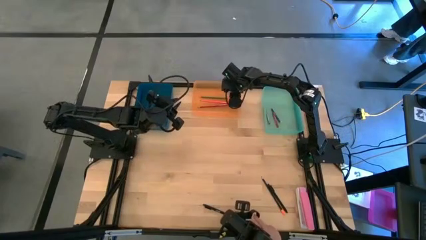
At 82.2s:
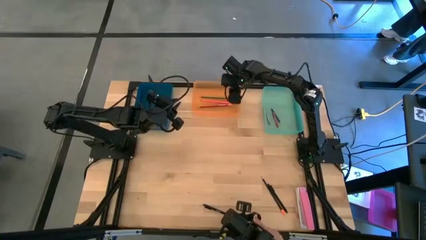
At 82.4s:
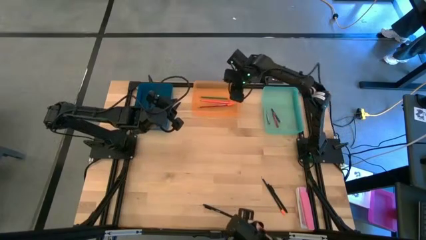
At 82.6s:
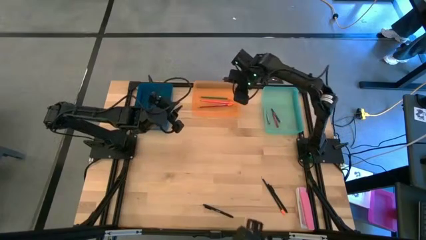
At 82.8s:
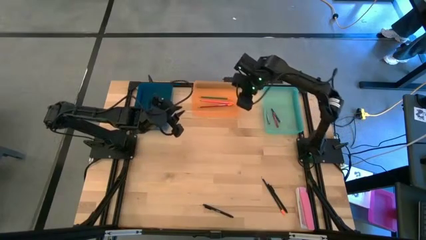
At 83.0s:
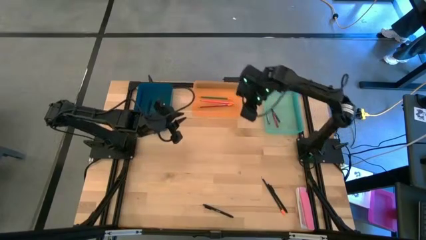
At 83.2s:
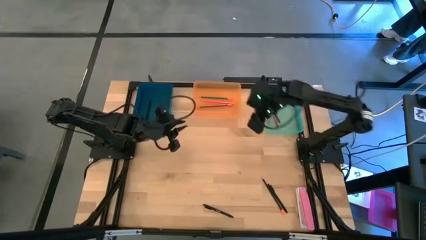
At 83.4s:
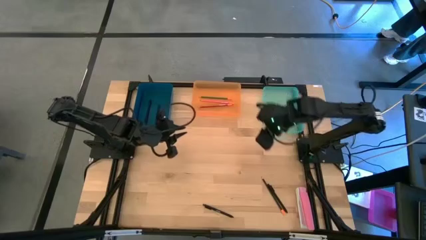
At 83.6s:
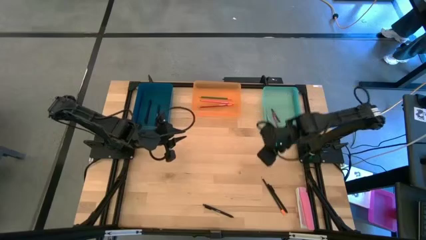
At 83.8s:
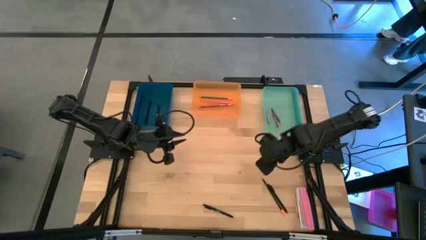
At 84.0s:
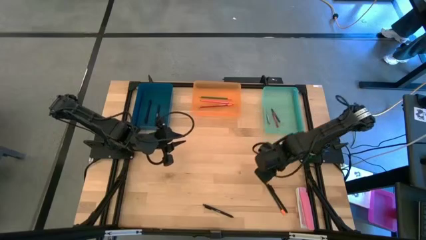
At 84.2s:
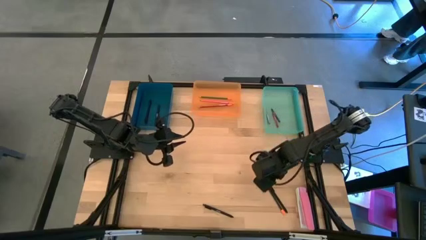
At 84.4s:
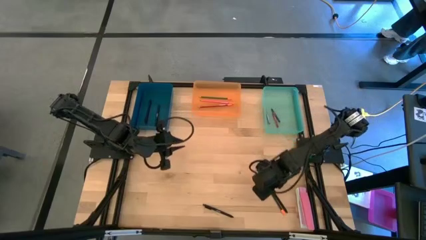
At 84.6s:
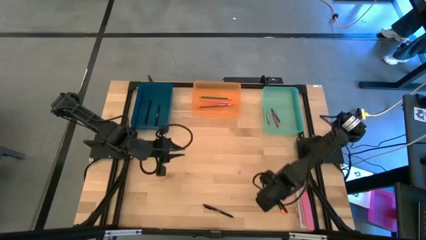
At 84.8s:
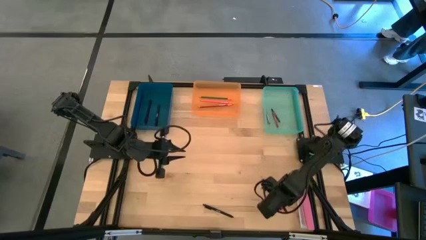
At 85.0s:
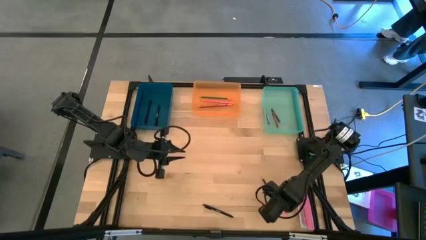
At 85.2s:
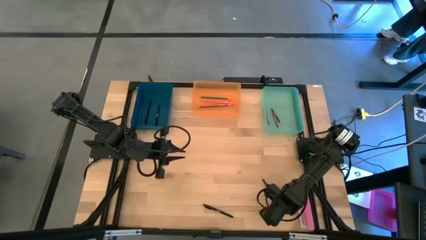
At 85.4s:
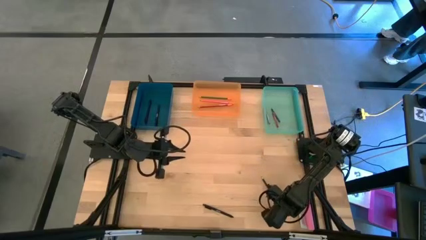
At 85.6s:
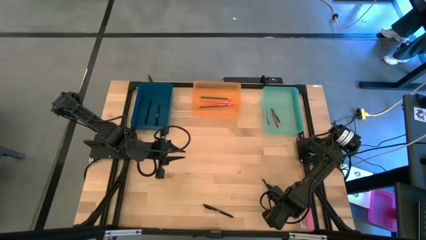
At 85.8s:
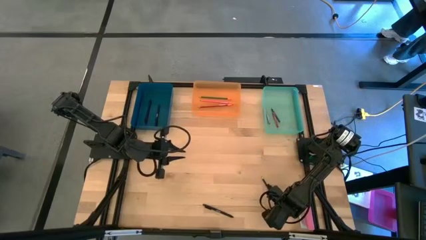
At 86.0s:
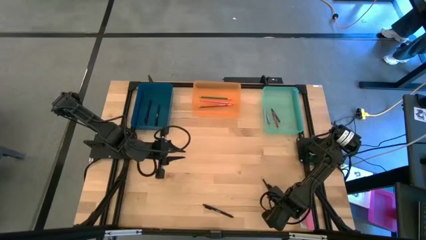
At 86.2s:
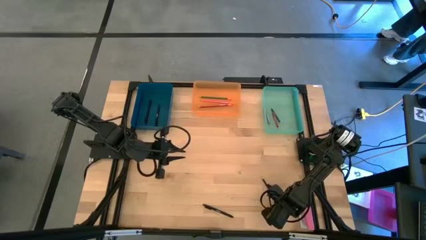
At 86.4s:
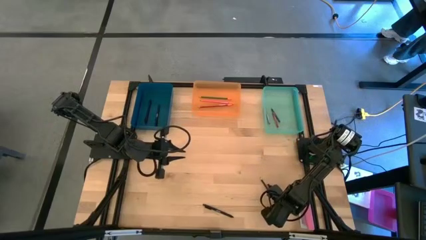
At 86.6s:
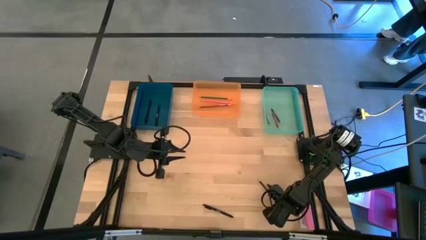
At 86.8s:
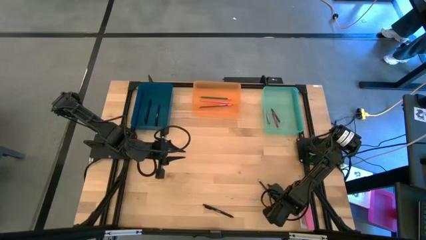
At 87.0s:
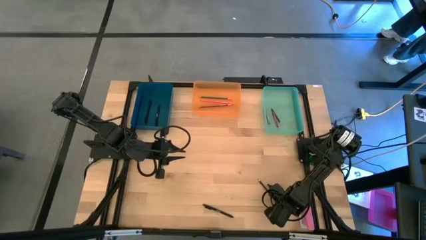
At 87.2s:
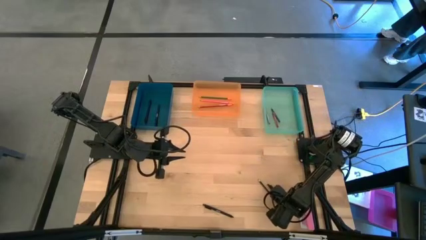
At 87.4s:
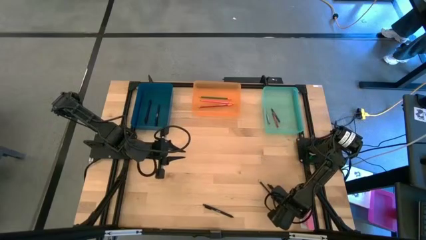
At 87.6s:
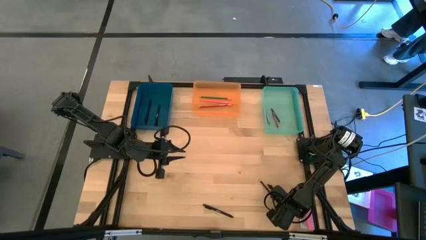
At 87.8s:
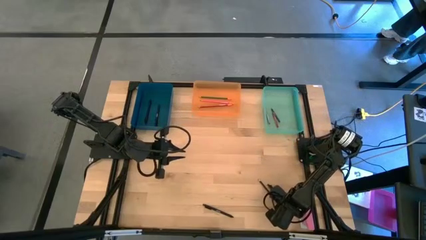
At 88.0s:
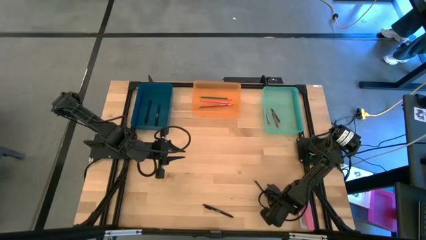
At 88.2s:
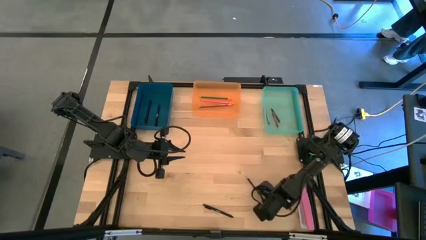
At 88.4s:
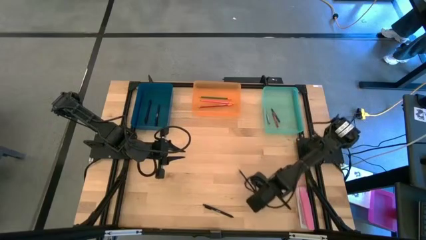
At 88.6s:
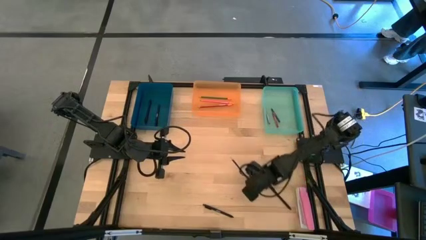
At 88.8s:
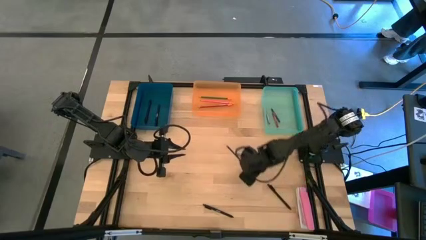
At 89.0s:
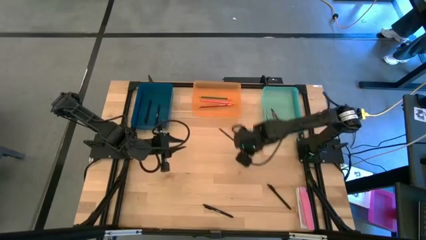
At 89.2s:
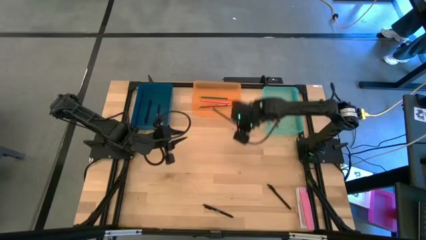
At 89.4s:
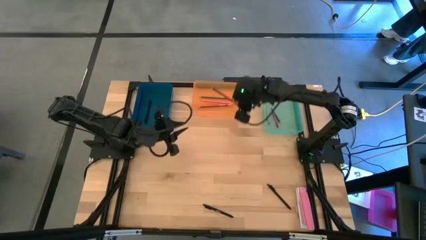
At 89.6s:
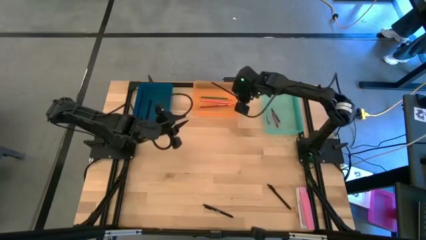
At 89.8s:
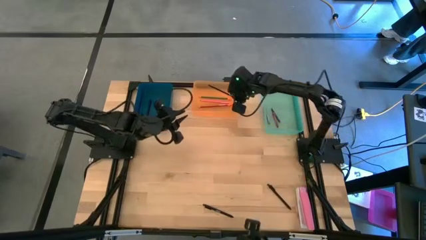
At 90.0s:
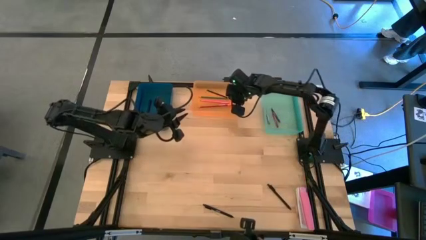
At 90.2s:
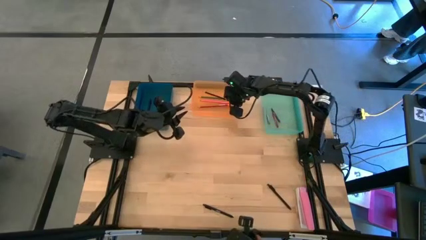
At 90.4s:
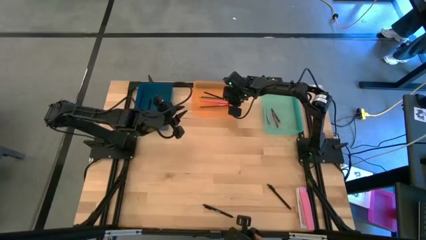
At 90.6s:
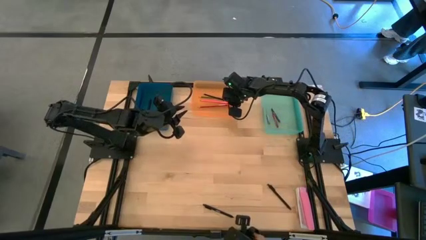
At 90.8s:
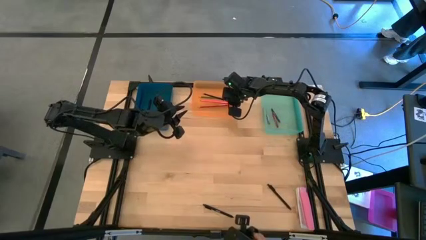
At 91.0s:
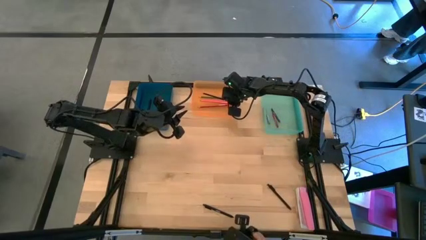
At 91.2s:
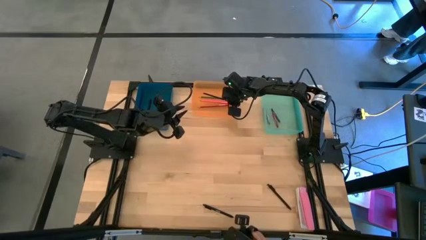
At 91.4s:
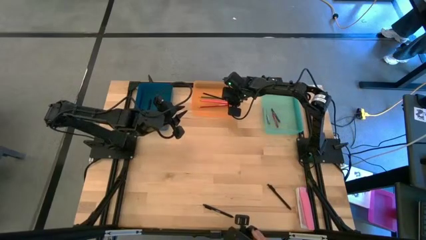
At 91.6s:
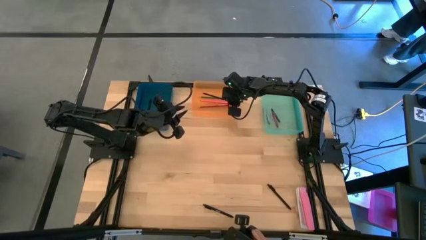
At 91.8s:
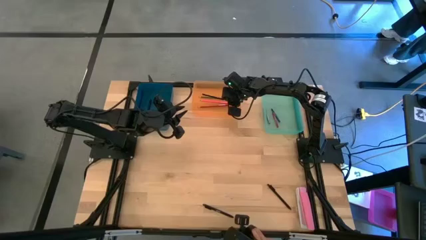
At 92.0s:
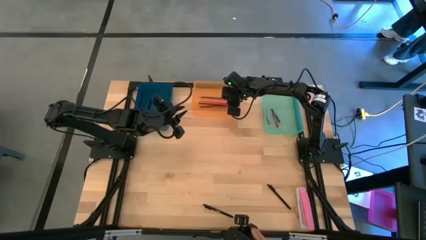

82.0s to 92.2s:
Task: Sort crayons/erasers/pens/pencils in bins
Put the blue pencil into the orange bin

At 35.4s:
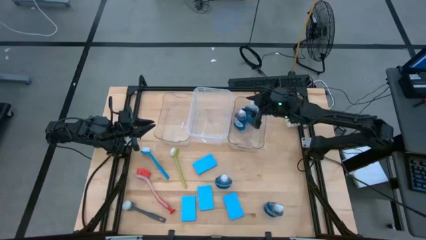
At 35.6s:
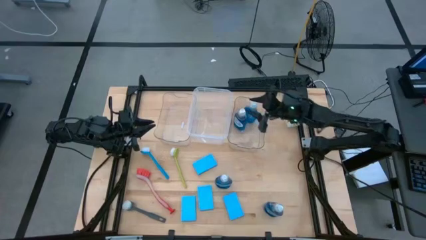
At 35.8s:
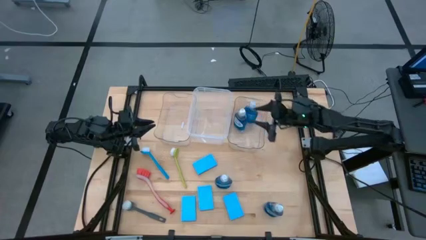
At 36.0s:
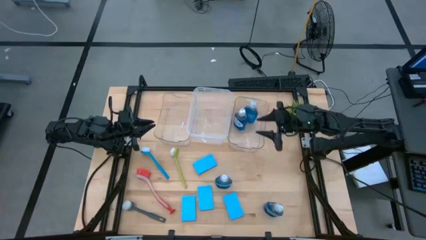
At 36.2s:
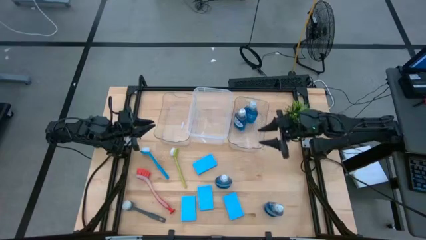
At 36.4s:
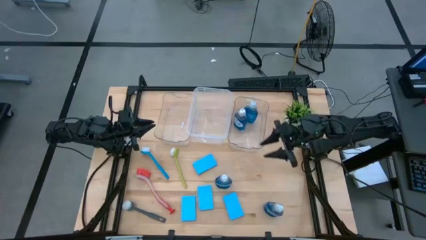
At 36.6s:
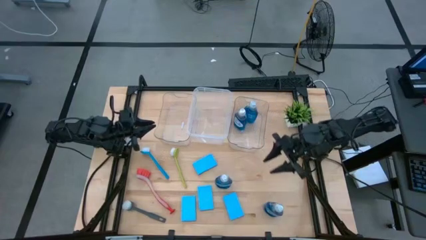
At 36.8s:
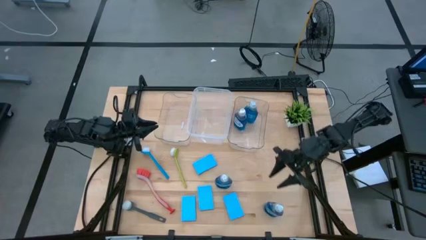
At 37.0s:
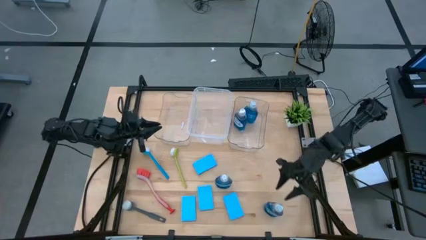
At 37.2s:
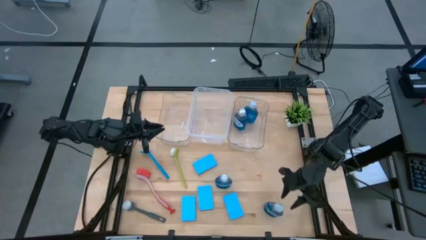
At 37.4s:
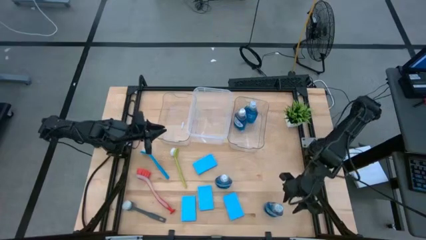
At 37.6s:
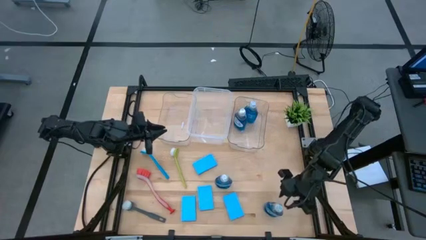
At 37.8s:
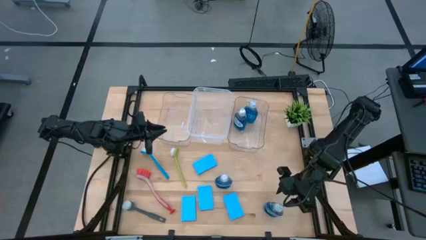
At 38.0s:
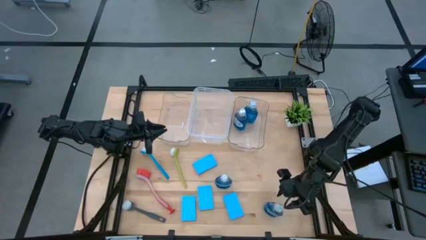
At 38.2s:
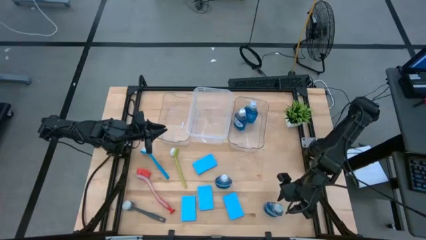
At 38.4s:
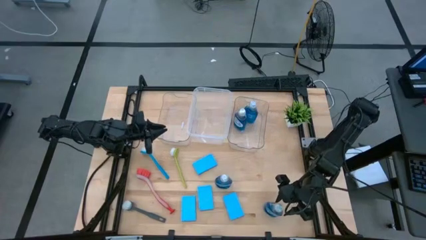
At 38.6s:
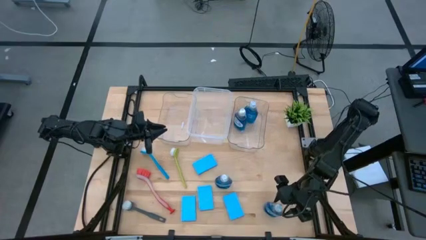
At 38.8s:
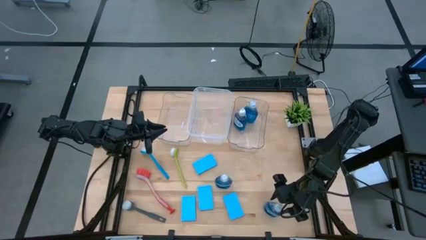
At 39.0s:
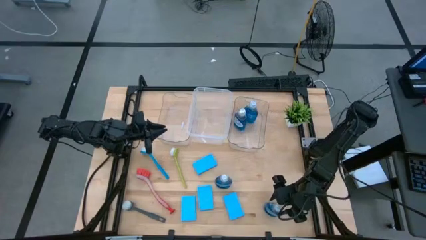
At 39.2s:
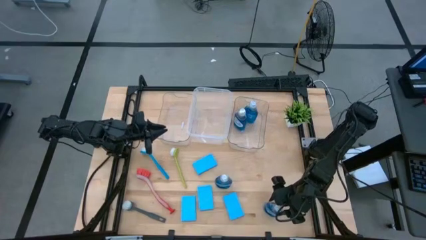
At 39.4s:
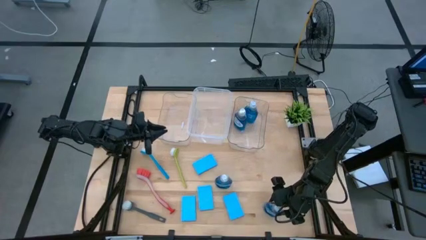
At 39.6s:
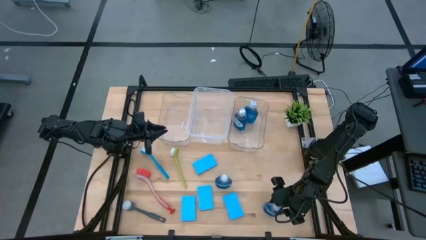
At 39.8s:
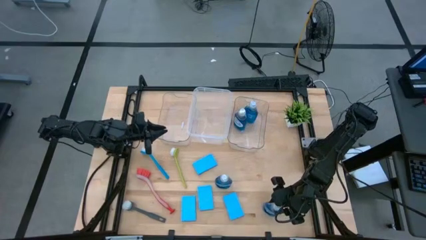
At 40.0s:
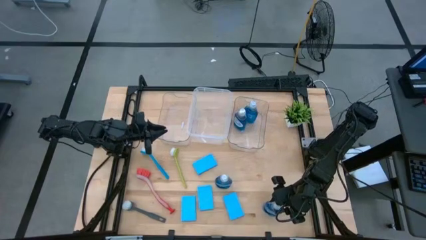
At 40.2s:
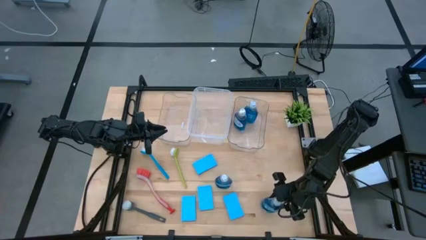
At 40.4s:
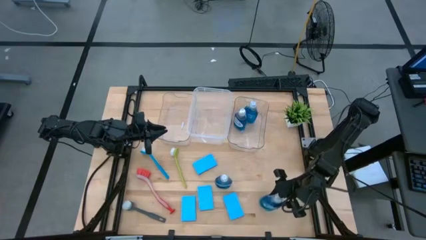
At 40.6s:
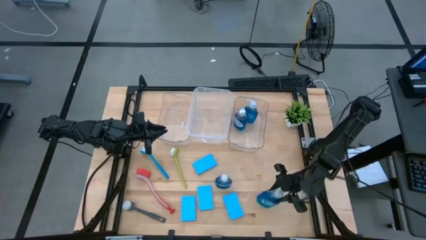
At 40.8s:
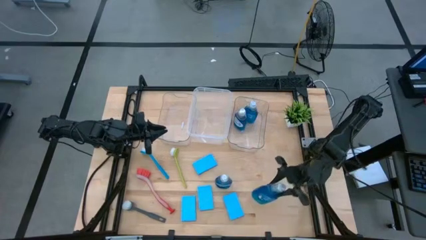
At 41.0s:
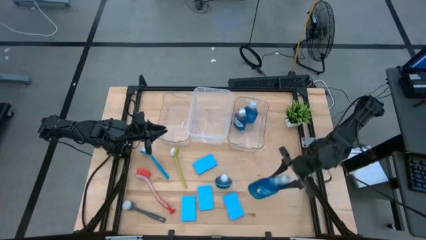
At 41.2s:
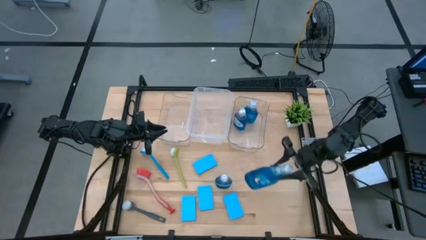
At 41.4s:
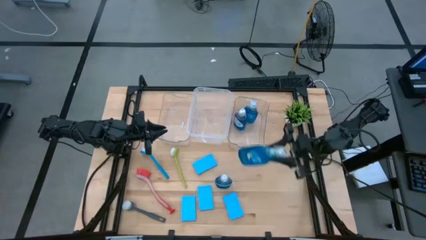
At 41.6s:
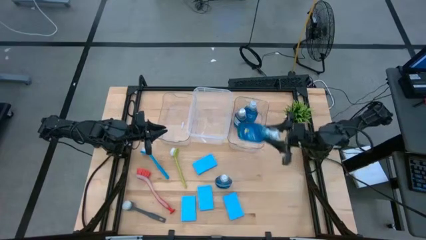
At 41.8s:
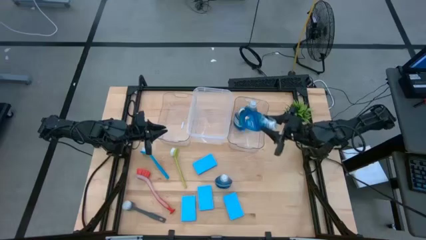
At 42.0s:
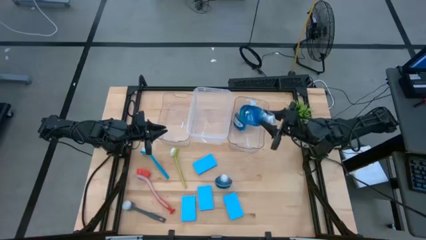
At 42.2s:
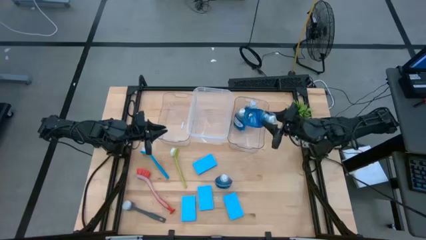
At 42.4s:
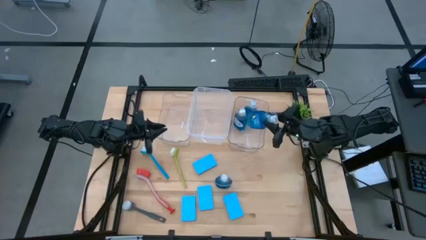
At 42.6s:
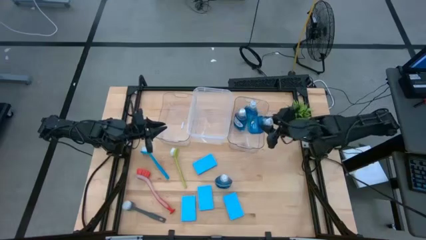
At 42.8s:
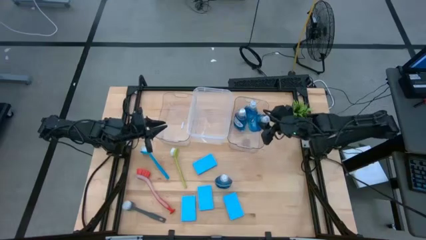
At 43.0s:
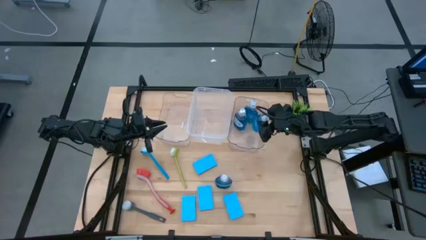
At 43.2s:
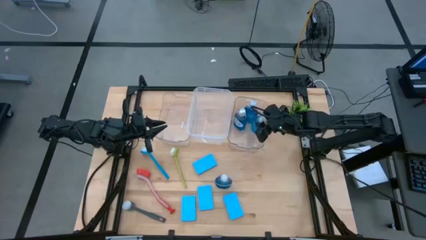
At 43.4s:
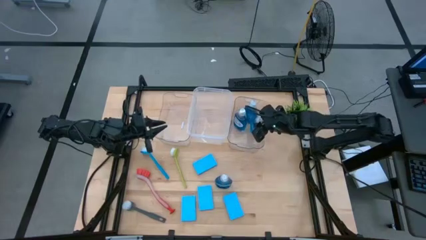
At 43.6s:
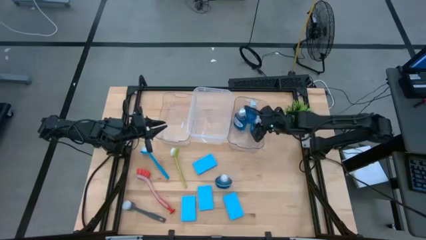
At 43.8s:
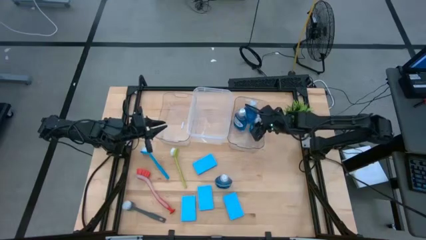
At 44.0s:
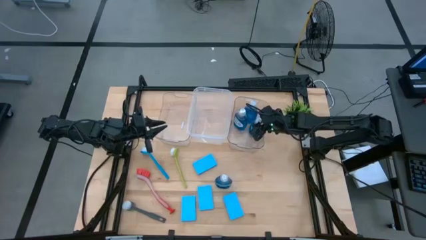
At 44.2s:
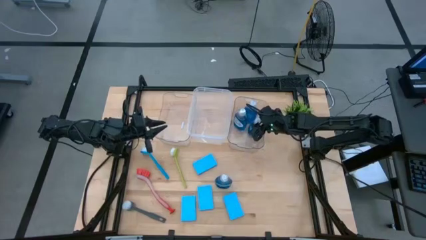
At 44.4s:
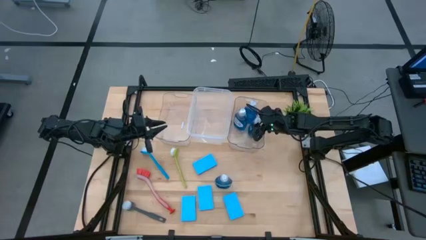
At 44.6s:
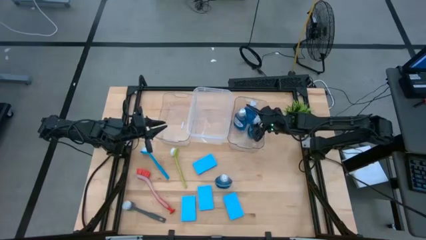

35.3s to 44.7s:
Task: Pick & Place Kitchen Sink Supplies
Put the blue dish soap into the right transparent bin
